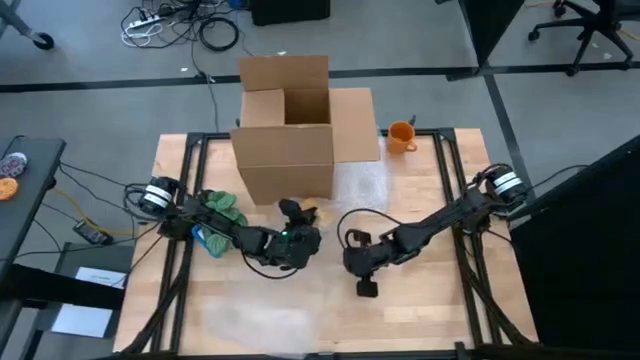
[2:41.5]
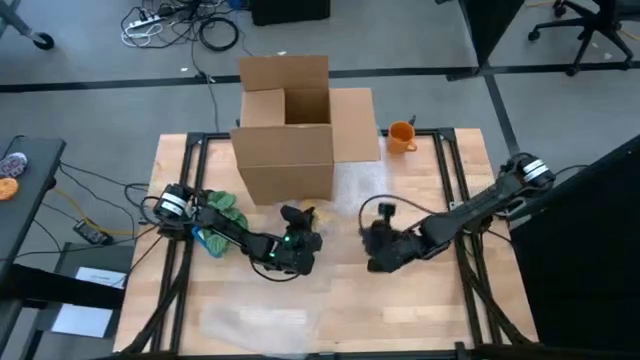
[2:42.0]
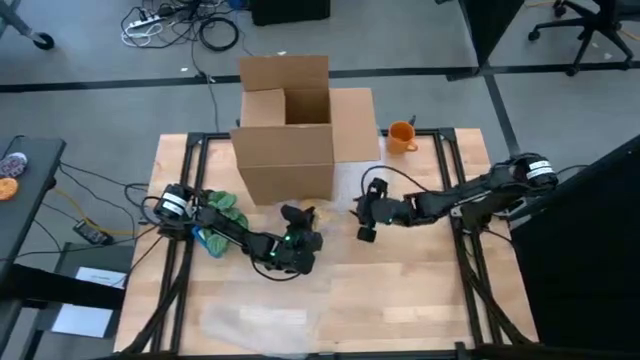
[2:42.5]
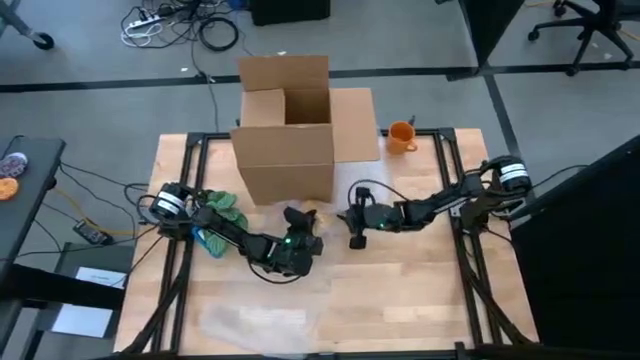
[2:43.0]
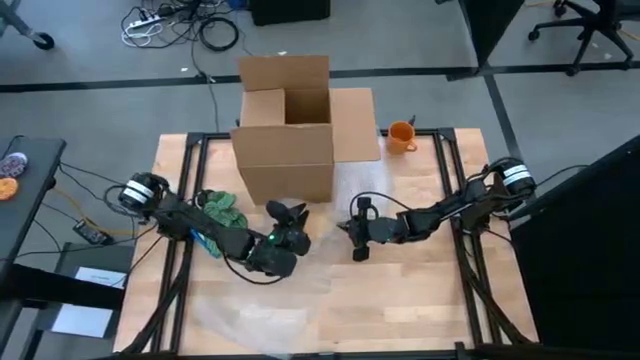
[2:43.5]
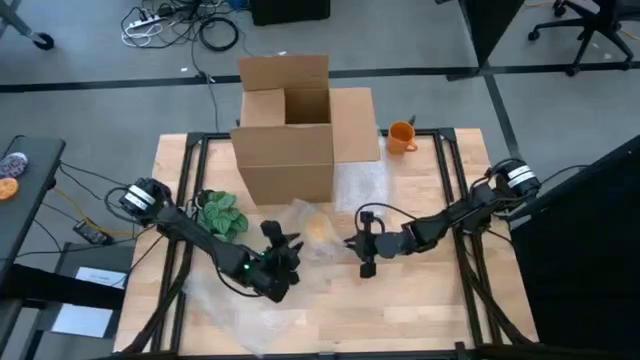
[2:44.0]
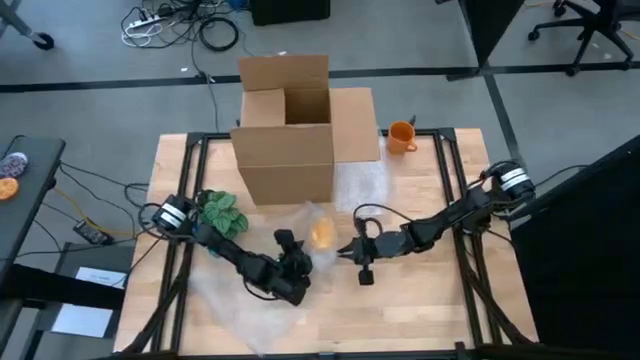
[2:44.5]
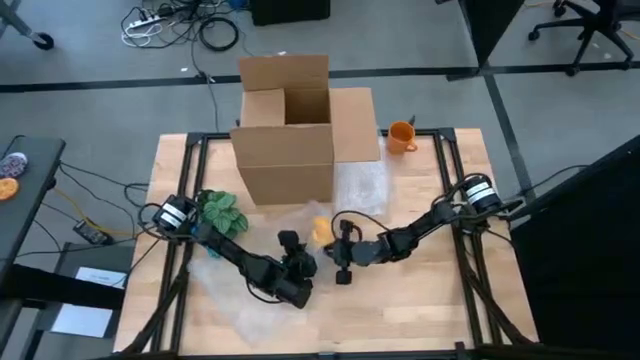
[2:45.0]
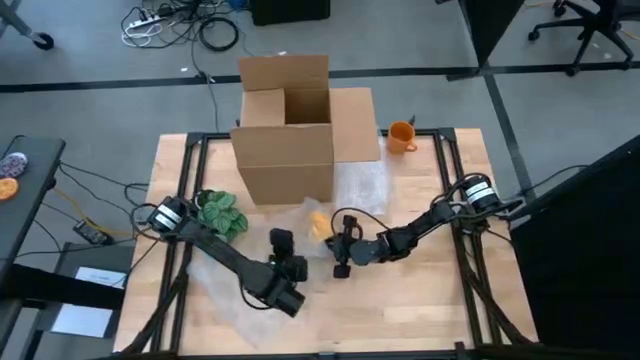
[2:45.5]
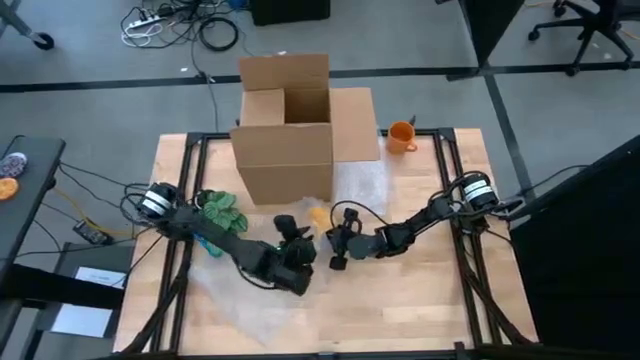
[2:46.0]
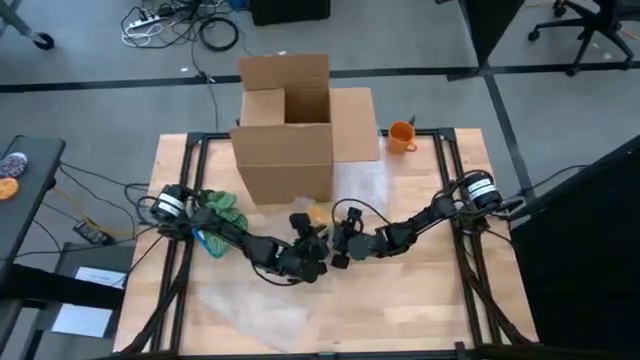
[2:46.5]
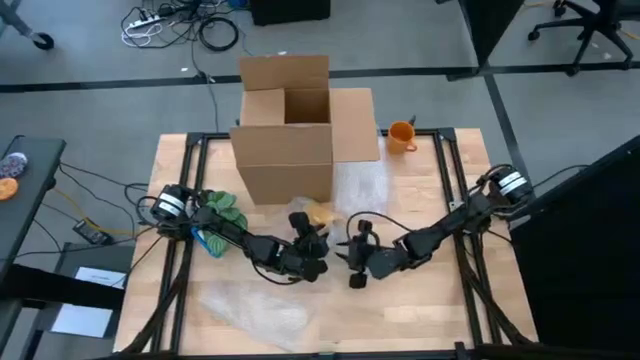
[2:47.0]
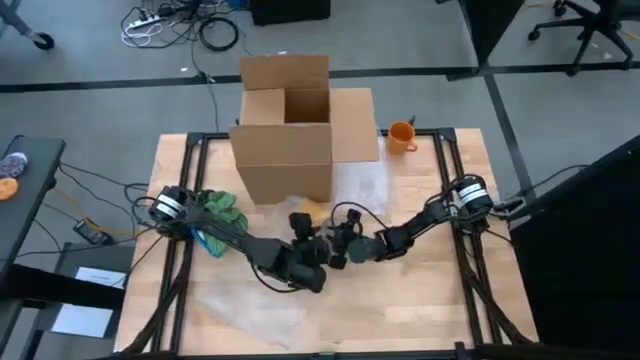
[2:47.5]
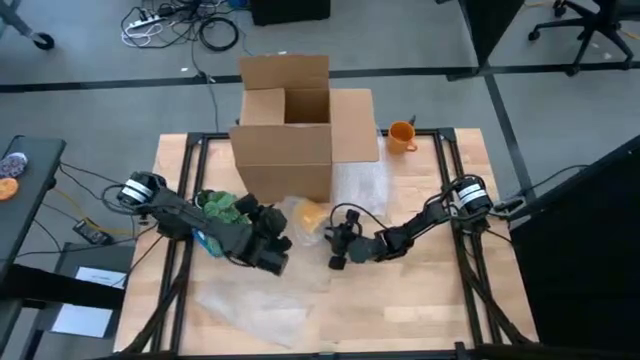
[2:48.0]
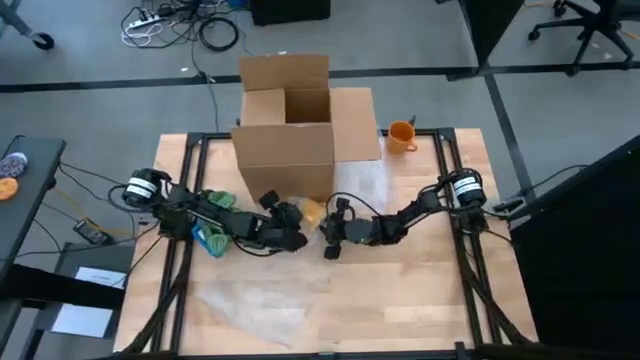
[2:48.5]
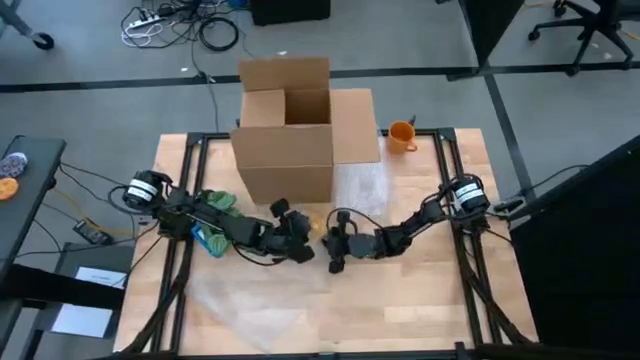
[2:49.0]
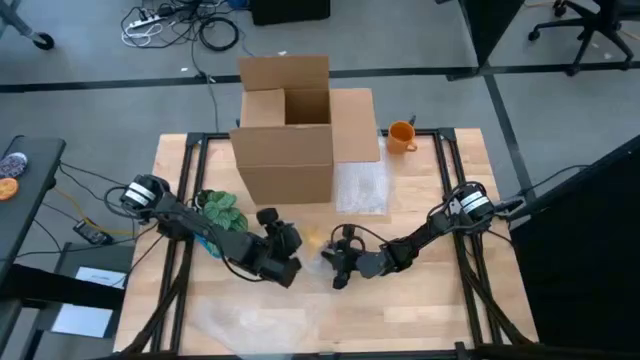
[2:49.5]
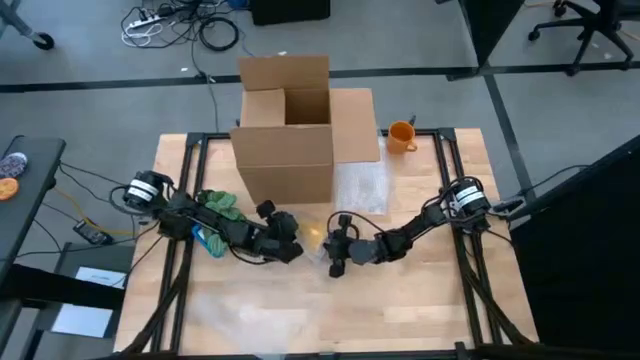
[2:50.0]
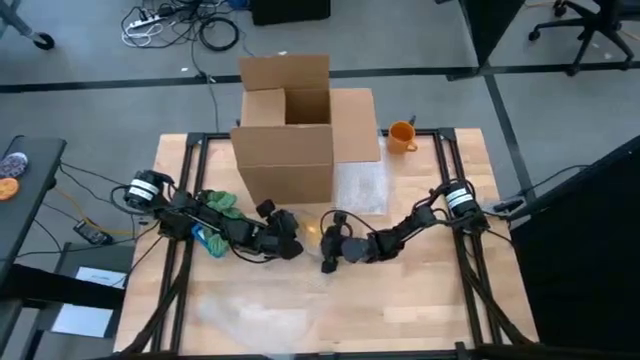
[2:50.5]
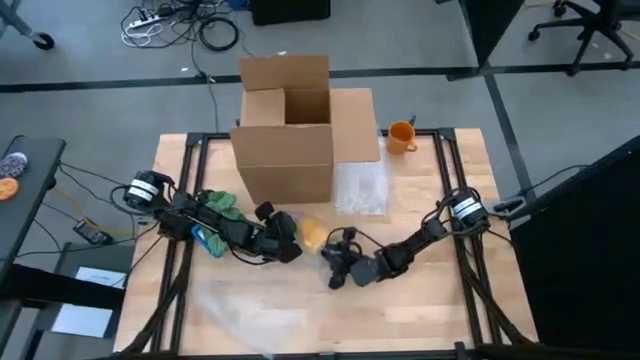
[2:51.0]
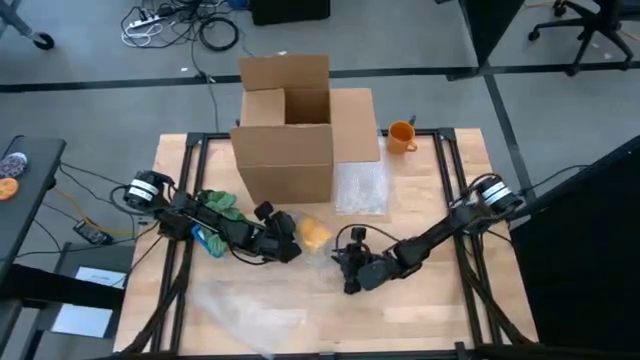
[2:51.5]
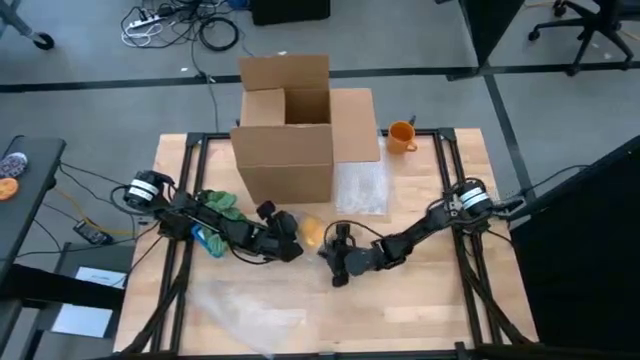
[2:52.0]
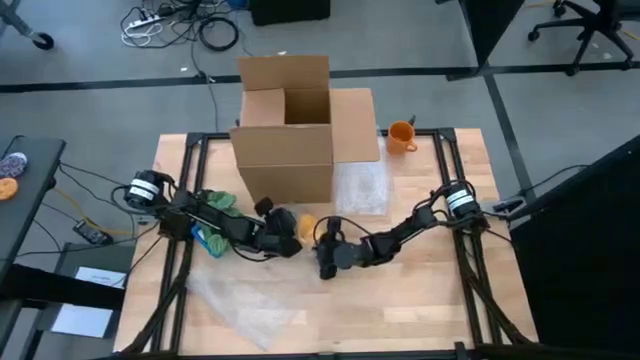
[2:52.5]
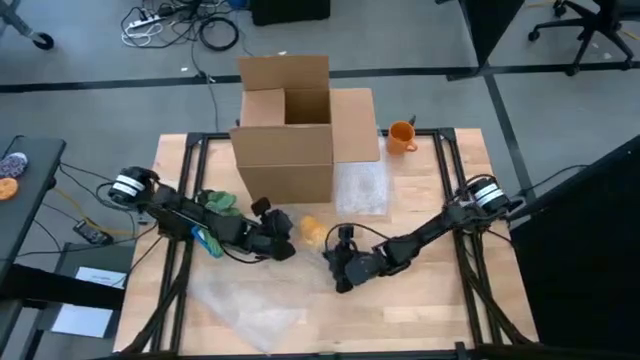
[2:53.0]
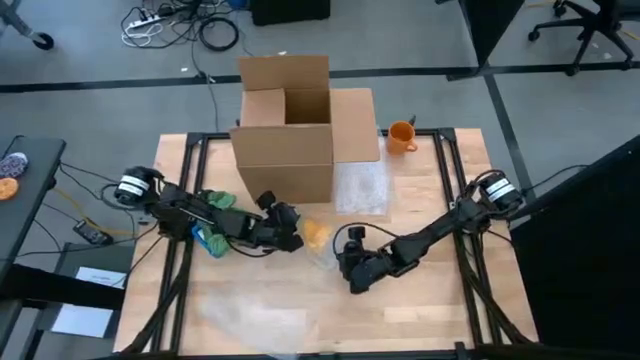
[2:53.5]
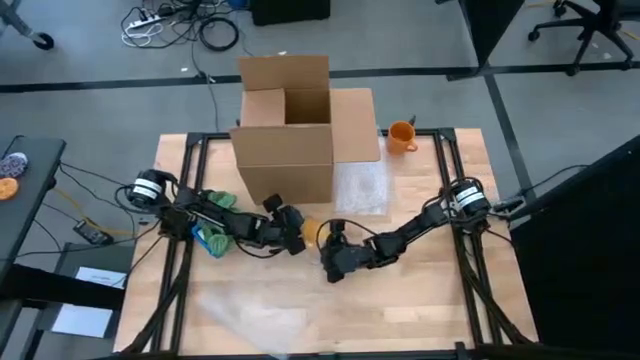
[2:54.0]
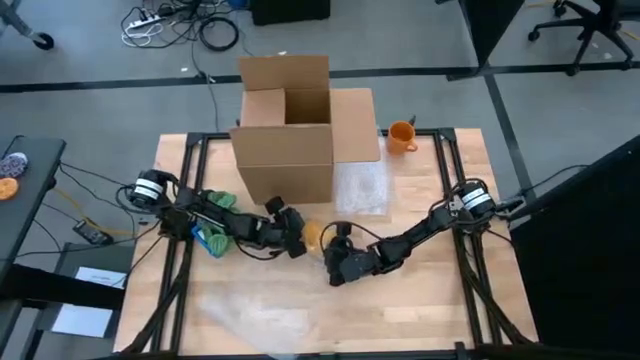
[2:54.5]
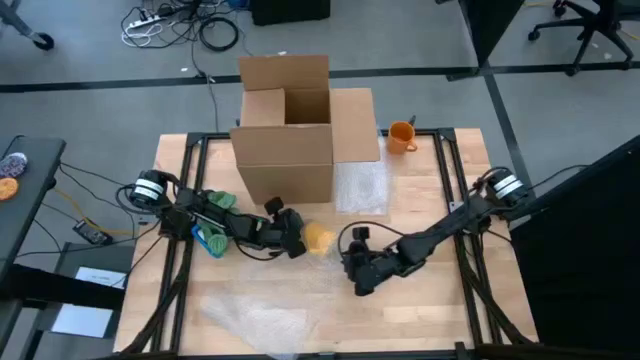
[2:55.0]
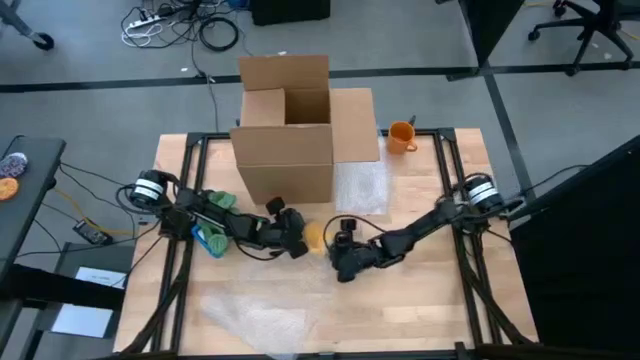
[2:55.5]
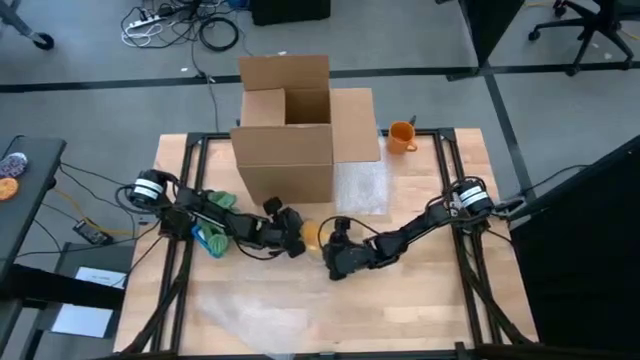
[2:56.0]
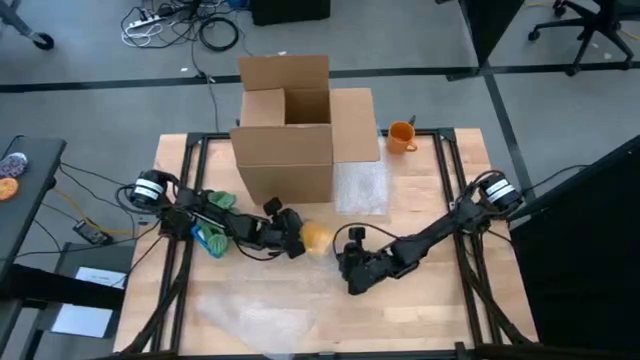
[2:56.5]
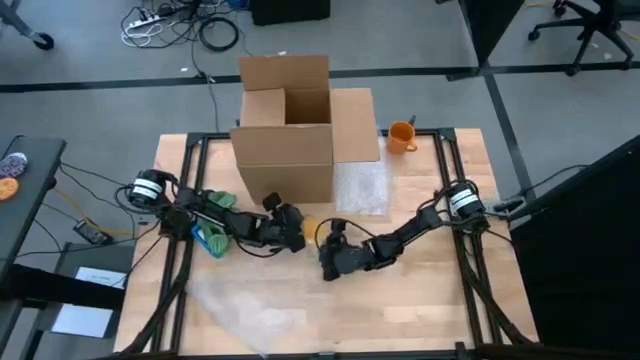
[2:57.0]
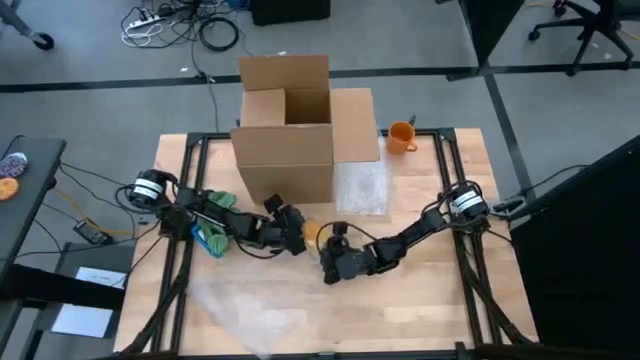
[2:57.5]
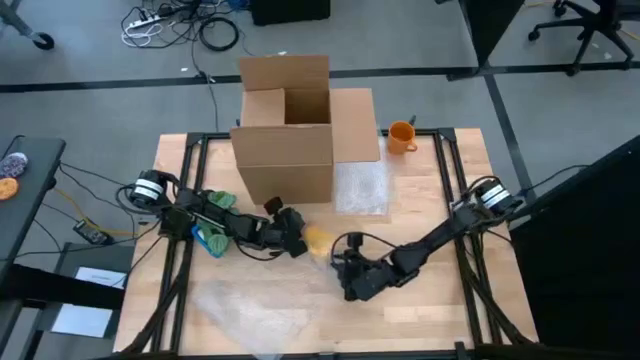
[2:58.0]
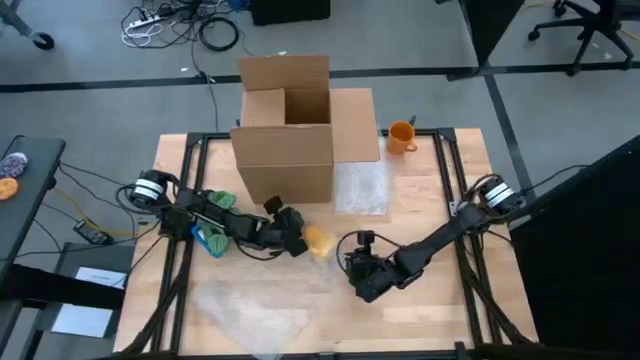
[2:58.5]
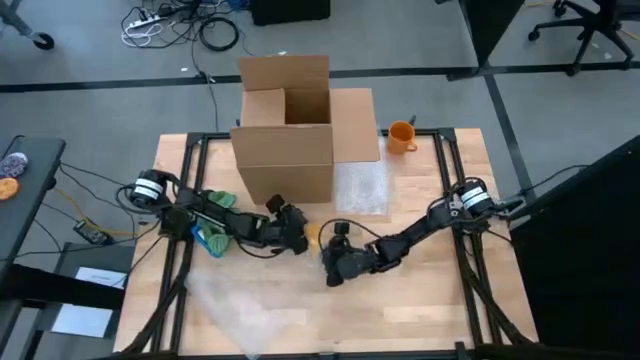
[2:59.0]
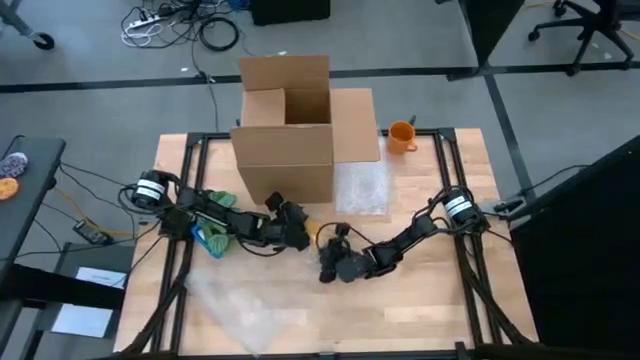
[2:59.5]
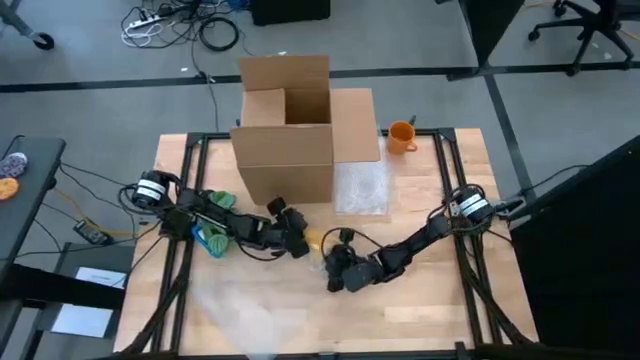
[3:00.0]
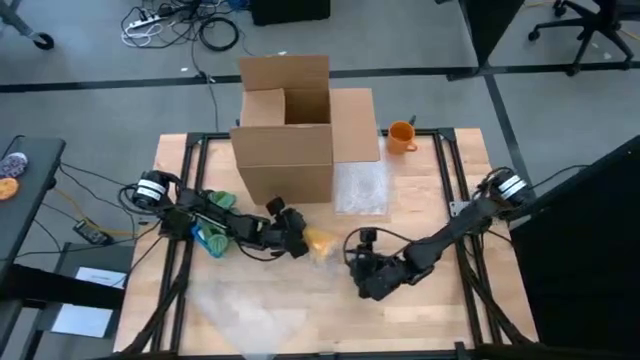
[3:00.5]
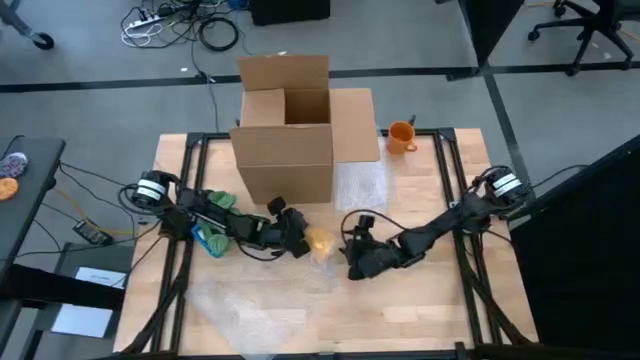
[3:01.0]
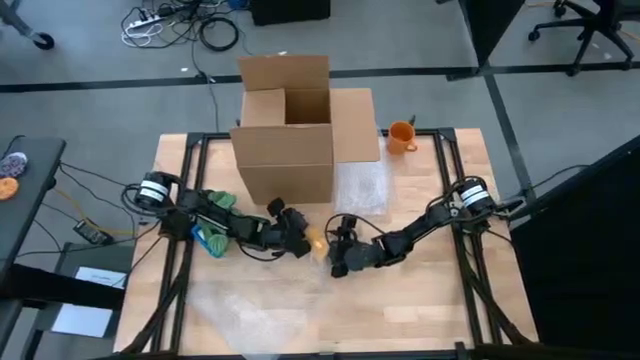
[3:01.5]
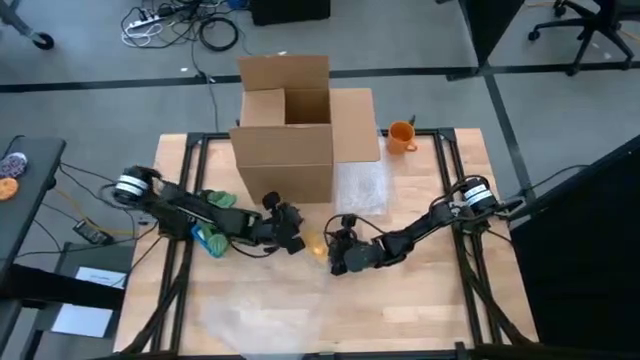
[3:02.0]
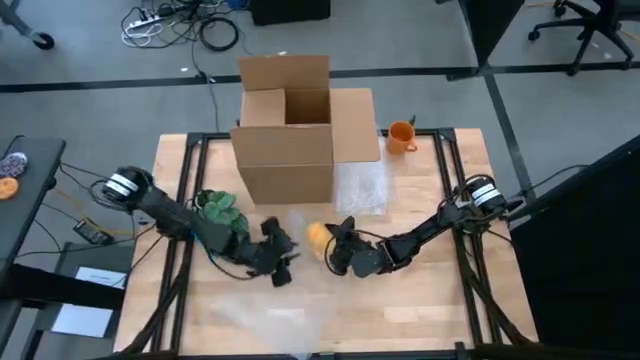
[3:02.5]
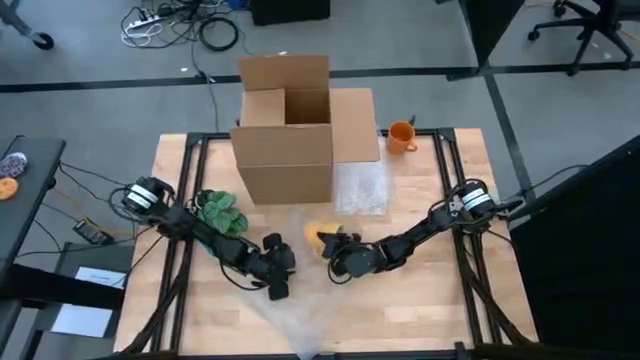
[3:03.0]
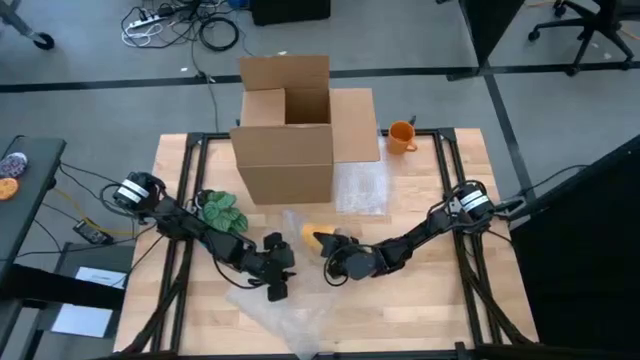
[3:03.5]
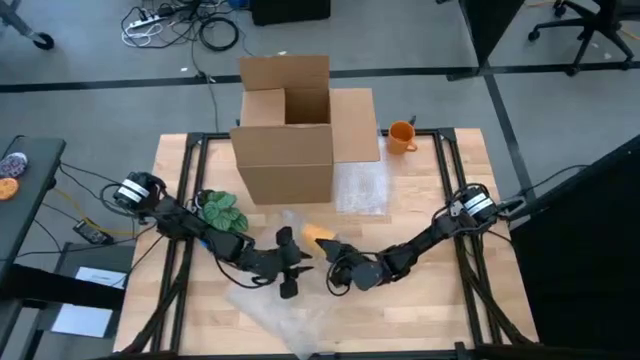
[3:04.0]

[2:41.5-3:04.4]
Task: wrap mug
Wrap the yellow mug with the bubble wrap
